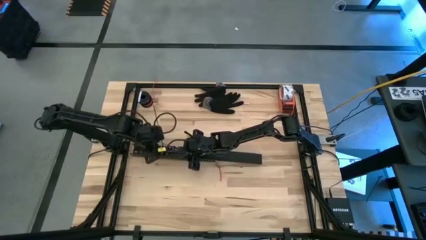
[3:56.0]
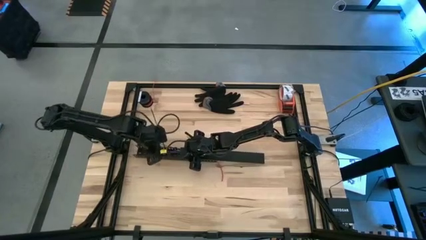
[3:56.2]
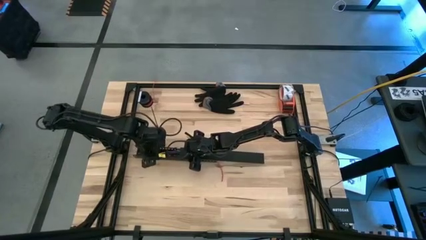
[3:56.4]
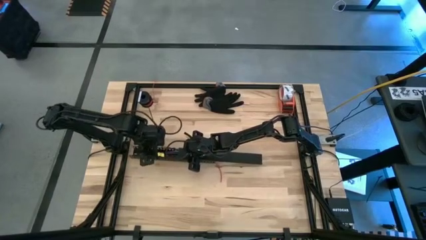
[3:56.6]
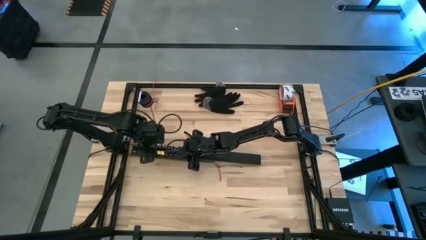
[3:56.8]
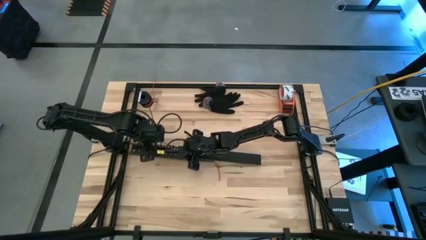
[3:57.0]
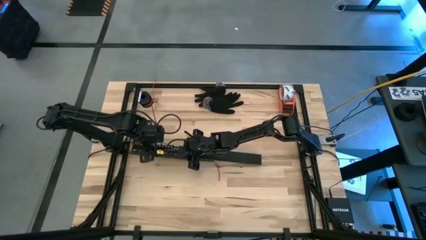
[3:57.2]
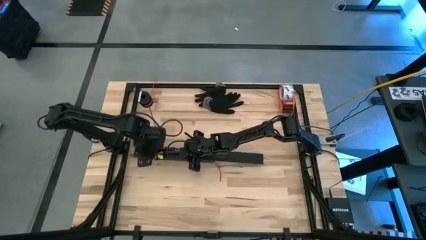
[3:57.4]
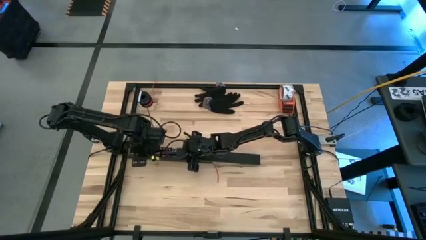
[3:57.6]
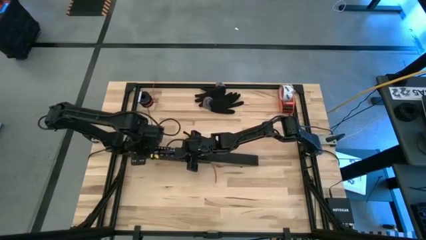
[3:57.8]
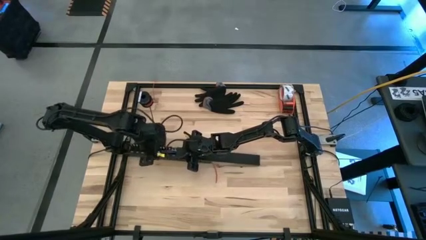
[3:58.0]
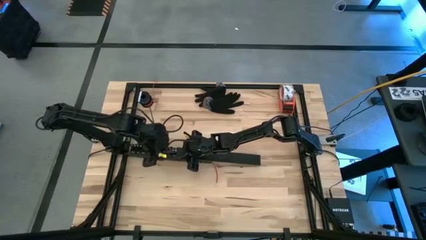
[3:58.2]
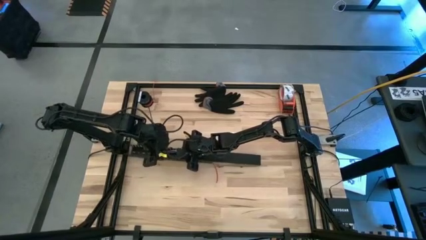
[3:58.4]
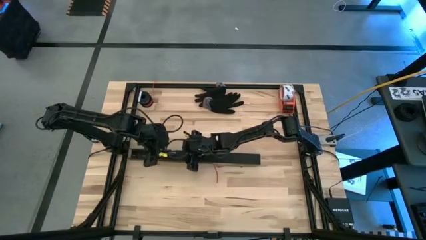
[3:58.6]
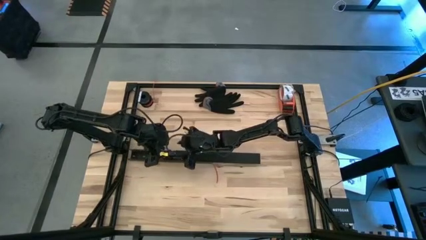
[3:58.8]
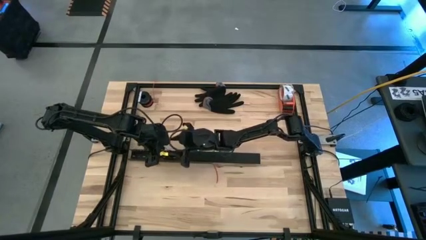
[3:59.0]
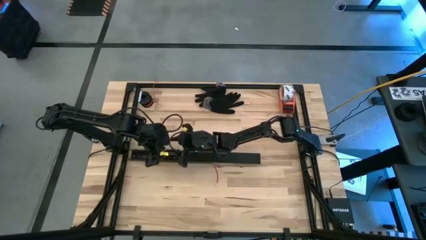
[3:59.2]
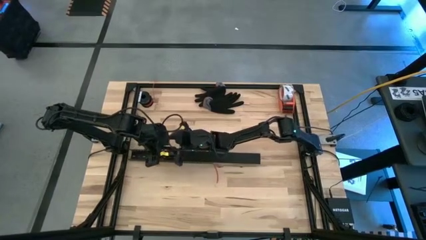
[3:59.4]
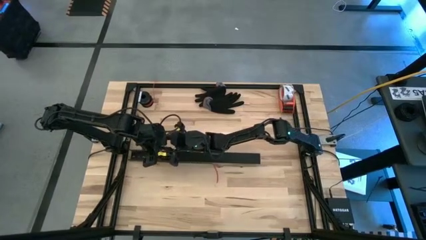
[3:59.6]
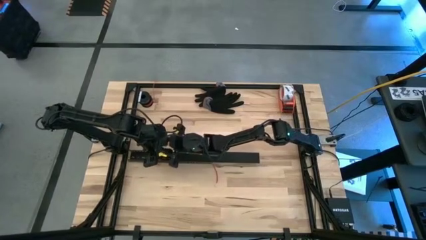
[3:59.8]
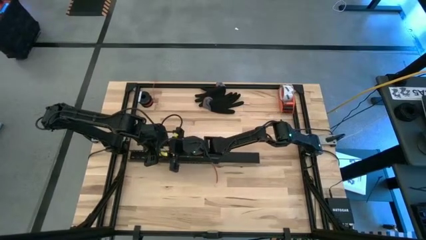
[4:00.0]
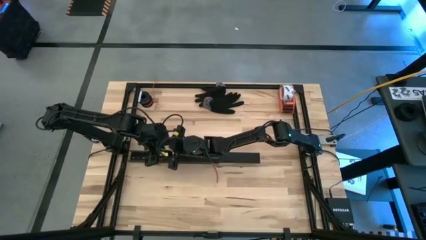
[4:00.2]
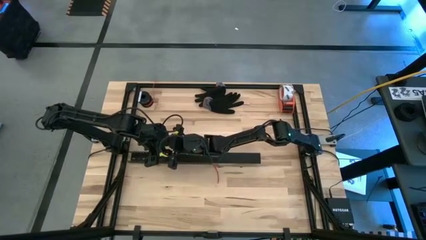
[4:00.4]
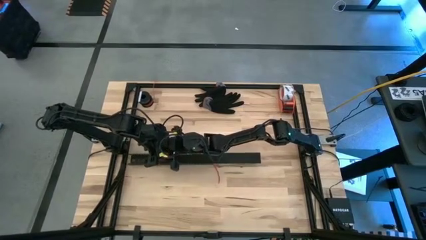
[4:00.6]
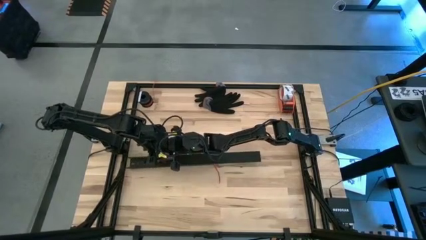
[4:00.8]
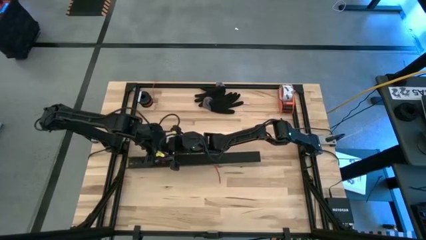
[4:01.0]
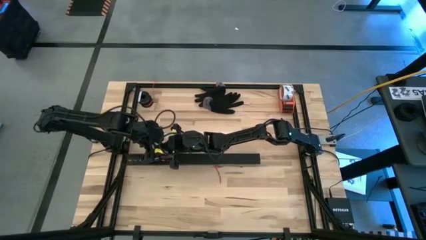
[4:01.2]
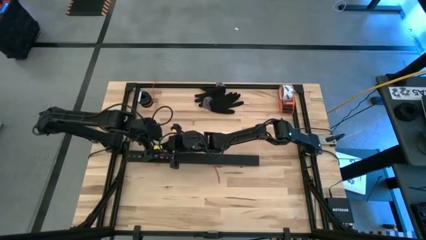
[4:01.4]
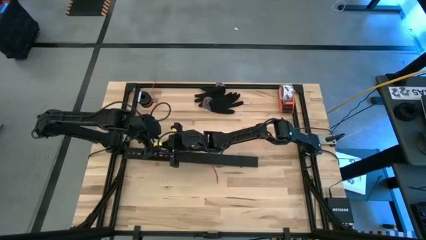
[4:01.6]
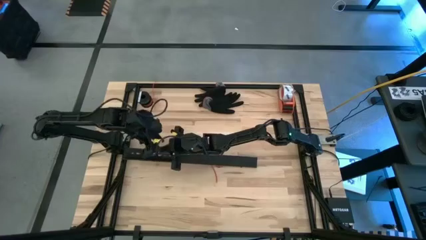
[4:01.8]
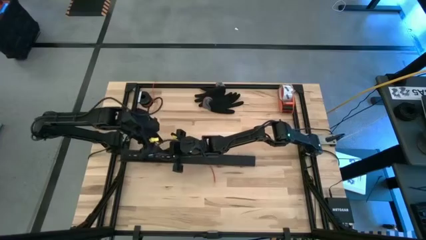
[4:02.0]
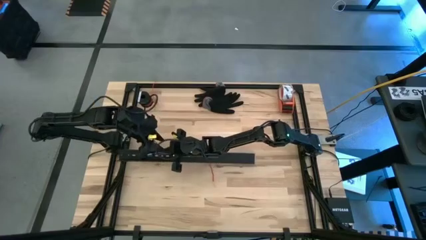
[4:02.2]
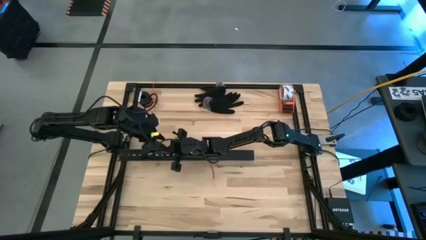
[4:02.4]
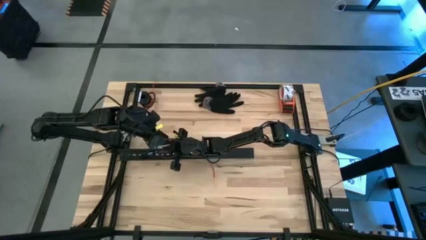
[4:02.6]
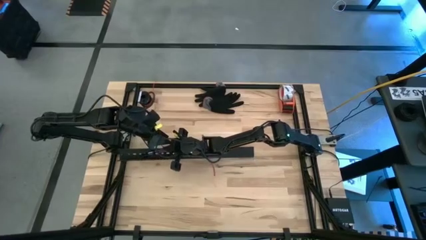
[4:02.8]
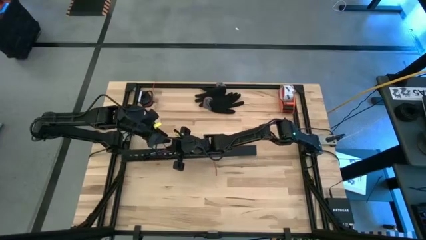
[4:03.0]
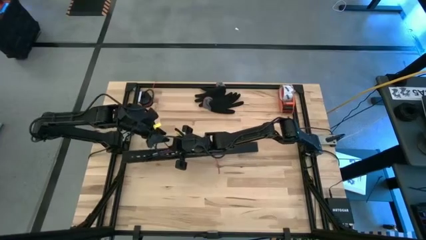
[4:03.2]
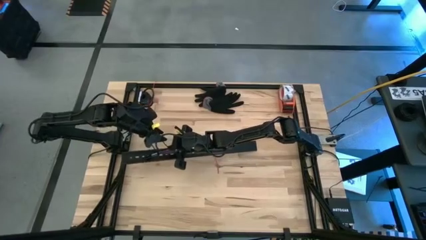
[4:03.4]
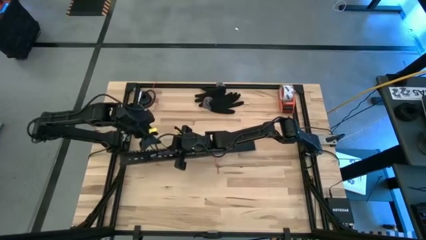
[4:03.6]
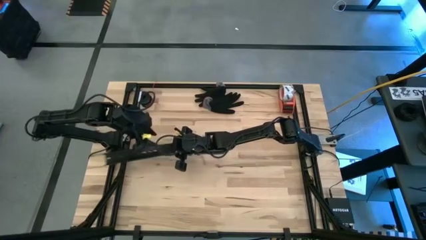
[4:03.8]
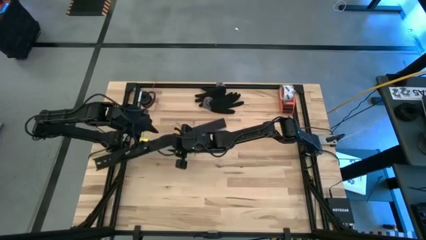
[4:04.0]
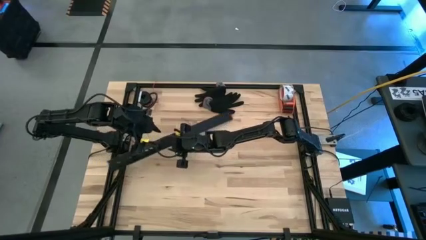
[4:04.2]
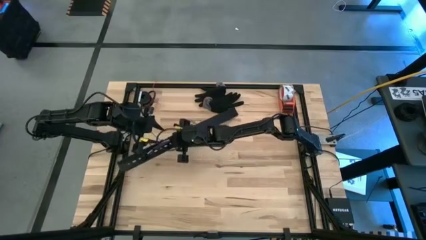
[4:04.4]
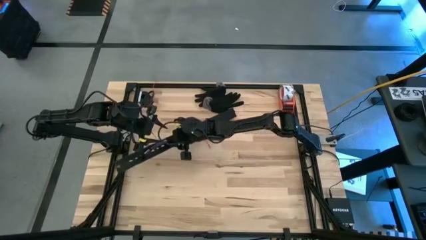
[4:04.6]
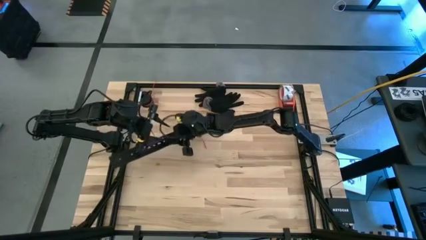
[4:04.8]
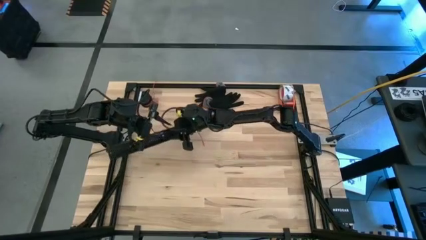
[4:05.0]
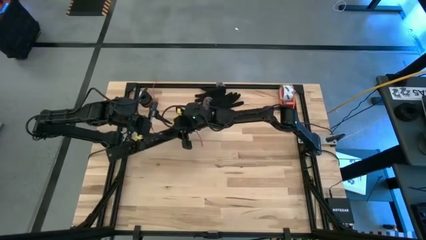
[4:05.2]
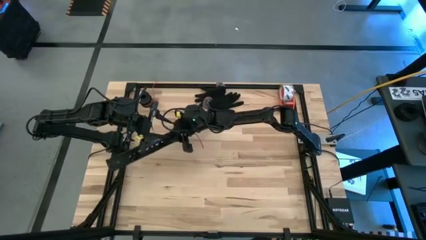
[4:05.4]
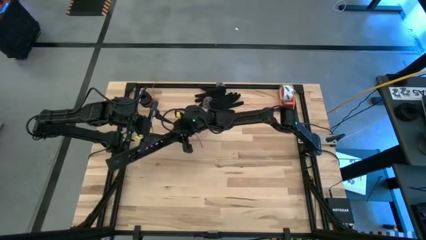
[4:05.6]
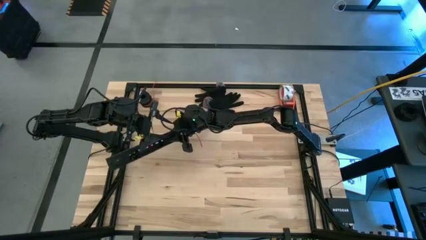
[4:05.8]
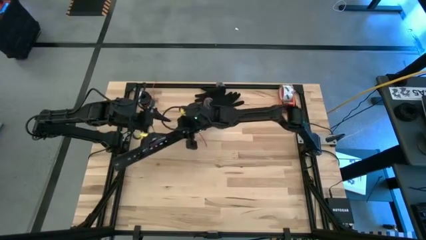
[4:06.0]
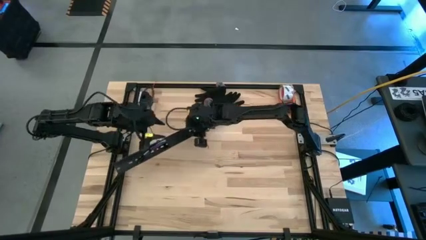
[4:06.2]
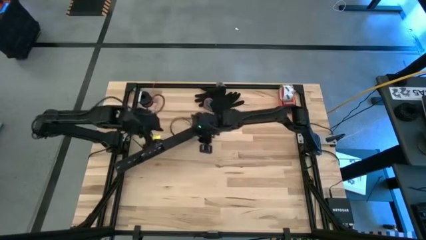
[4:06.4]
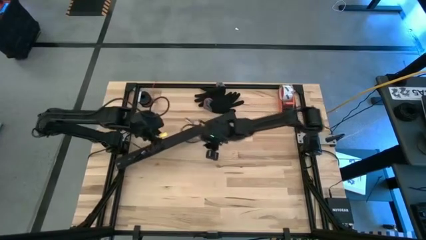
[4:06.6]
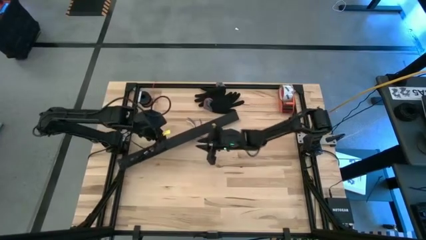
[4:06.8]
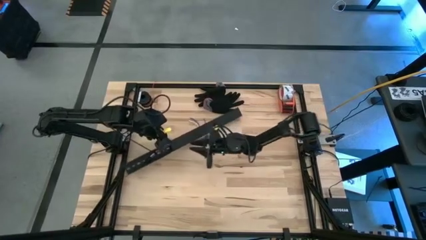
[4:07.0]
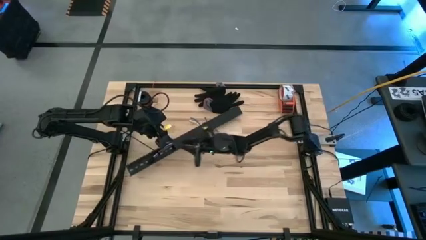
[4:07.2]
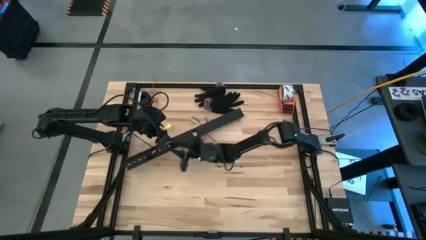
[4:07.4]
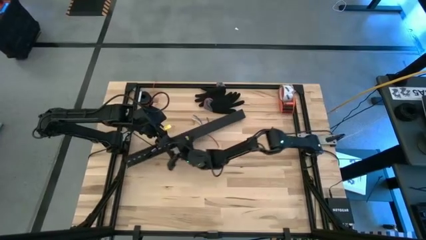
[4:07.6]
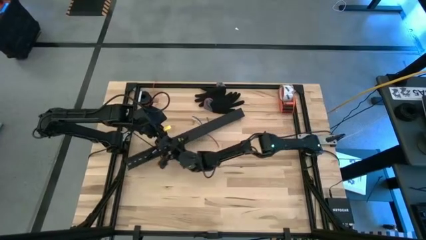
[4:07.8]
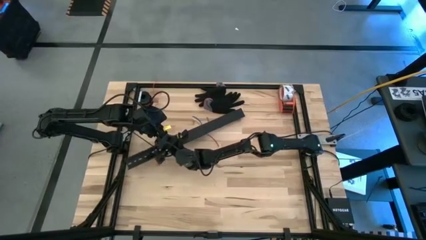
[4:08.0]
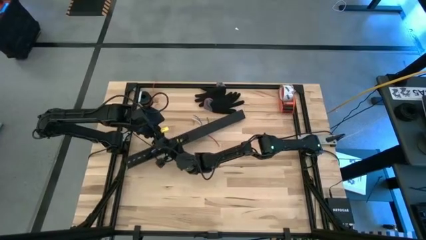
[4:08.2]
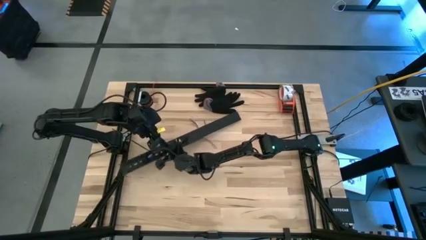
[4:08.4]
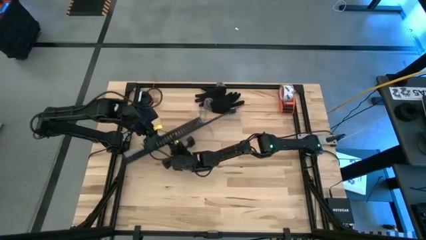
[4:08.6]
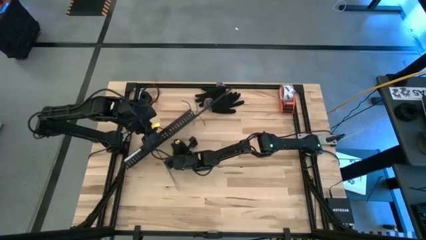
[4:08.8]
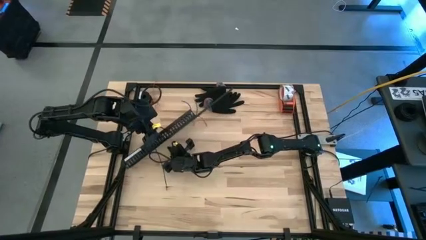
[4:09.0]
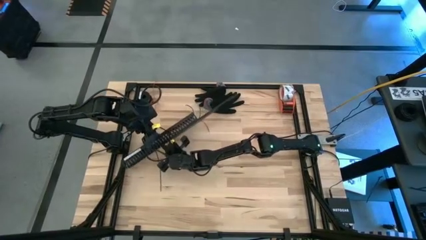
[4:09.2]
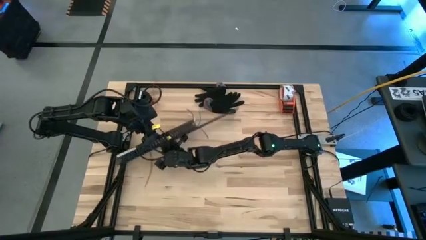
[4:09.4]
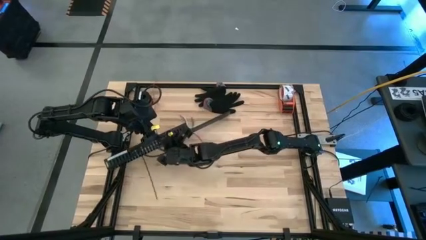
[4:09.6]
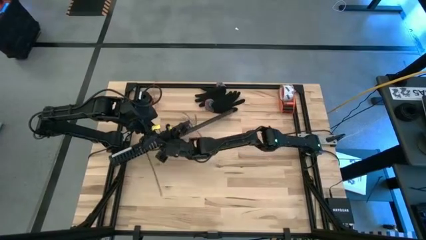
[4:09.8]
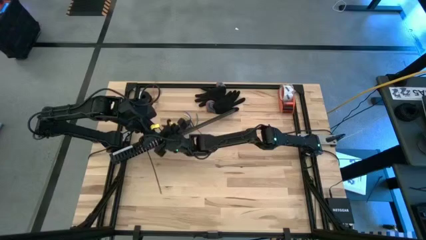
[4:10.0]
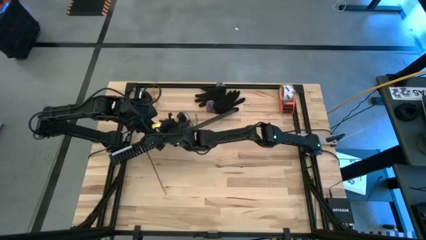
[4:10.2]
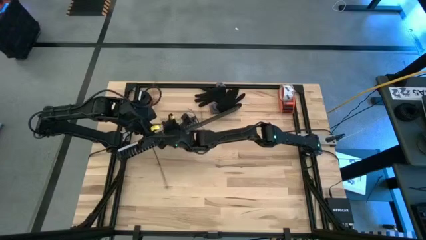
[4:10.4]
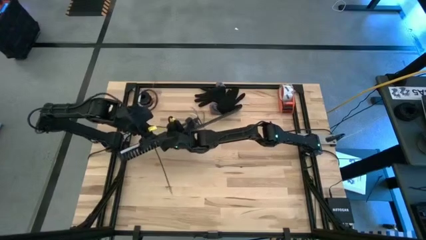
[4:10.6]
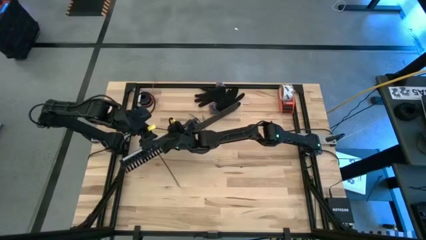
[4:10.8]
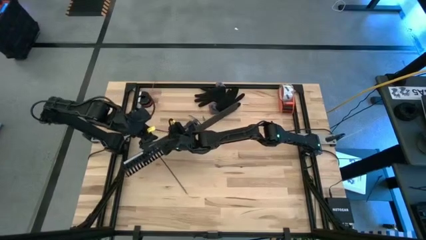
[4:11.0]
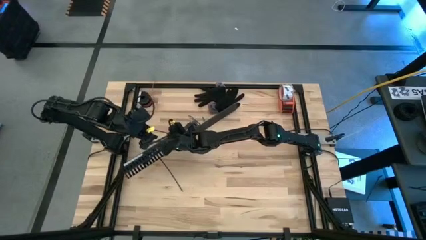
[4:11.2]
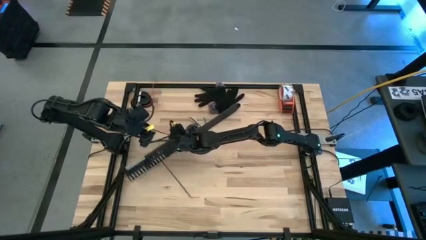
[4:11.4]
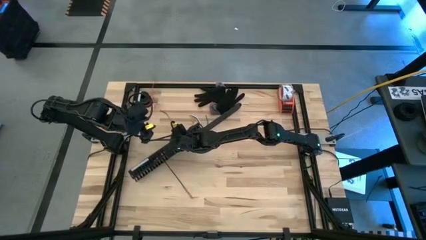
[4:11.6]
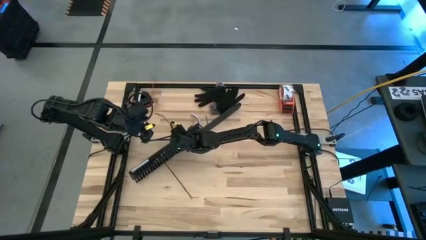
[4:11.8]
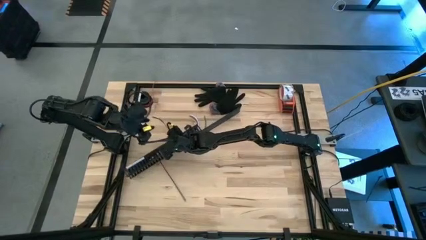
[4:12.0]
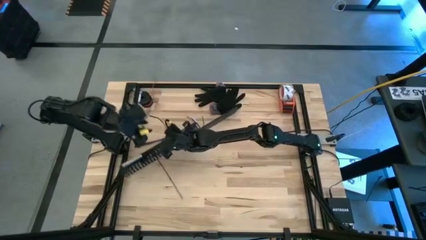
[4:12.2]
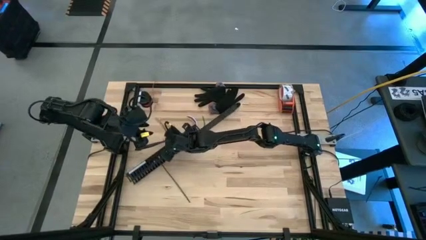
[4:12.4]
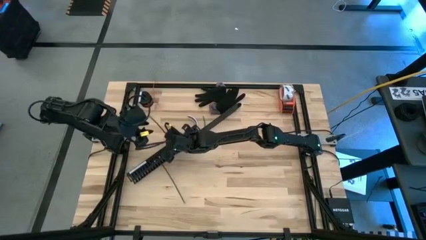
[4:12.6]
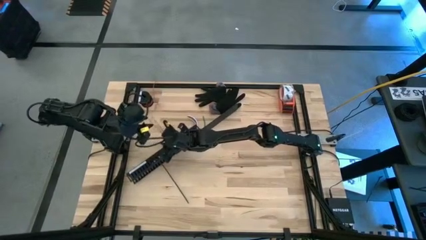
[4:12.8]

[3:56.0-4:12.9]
Task: Ziptie cables
Close the black cable duct lid
